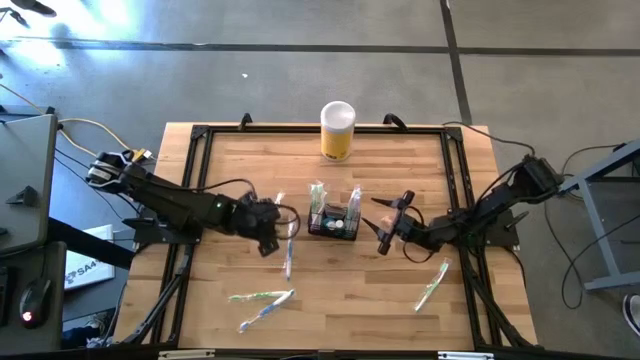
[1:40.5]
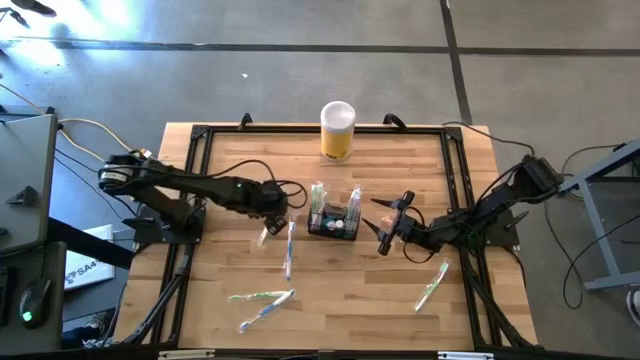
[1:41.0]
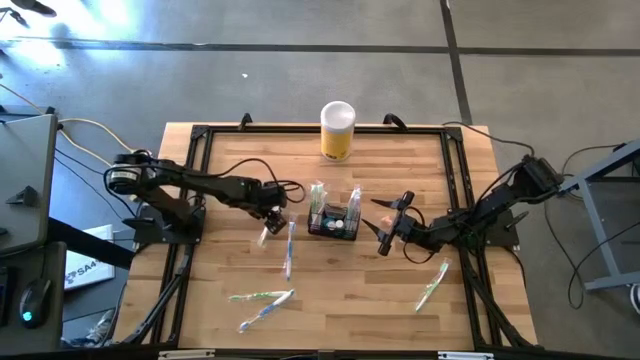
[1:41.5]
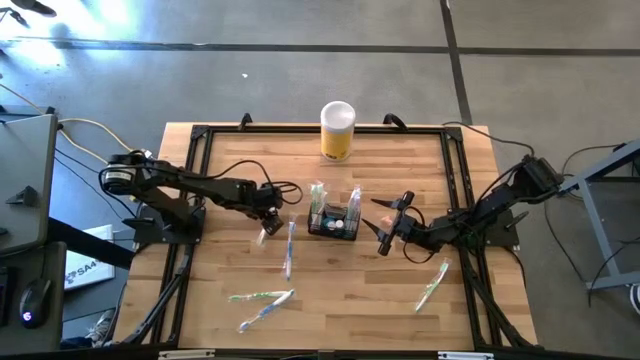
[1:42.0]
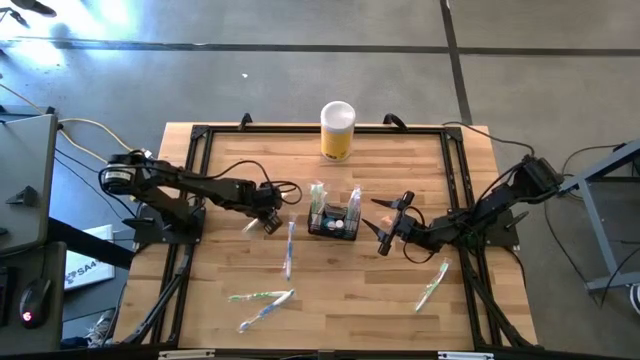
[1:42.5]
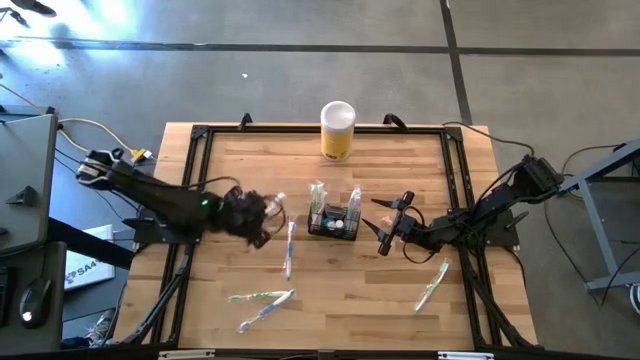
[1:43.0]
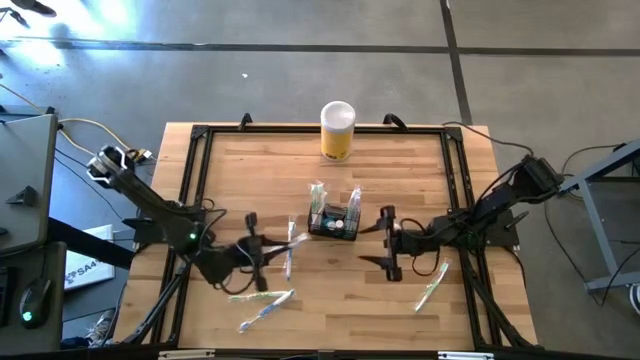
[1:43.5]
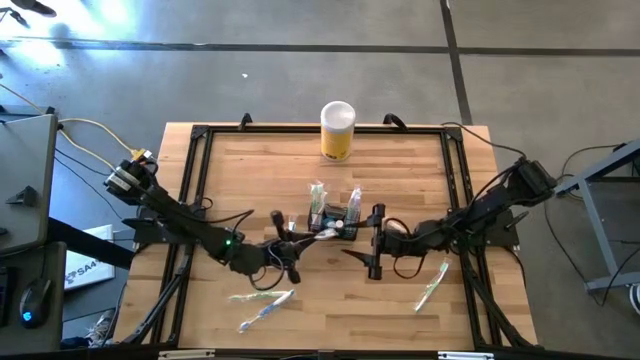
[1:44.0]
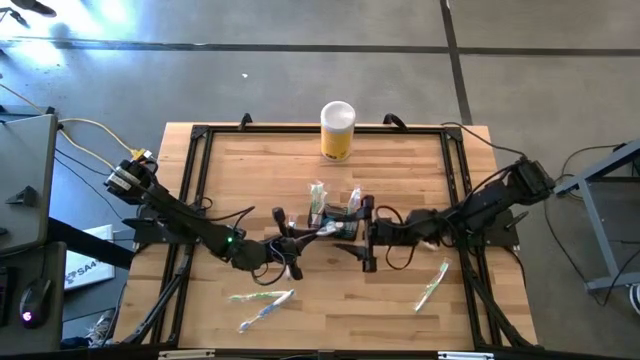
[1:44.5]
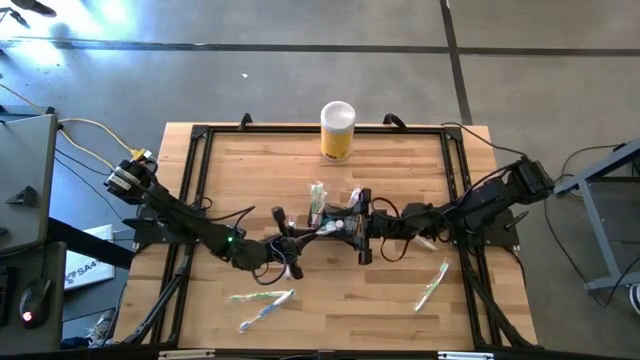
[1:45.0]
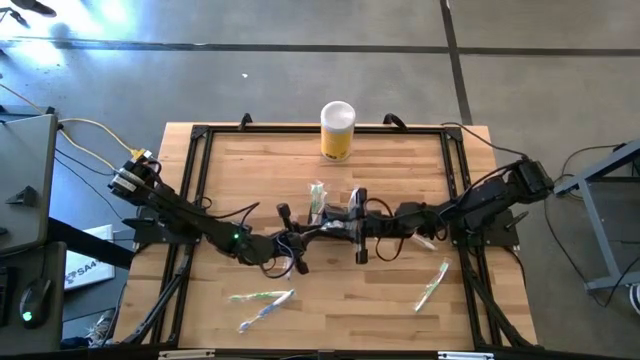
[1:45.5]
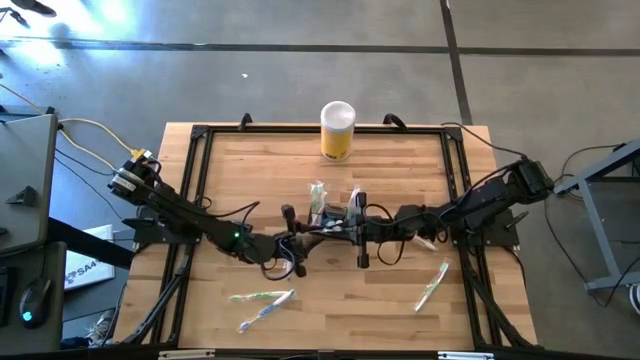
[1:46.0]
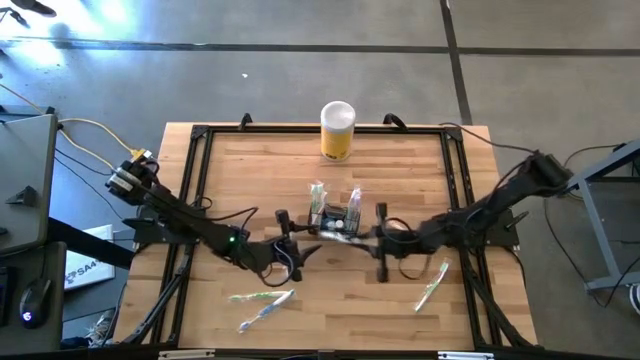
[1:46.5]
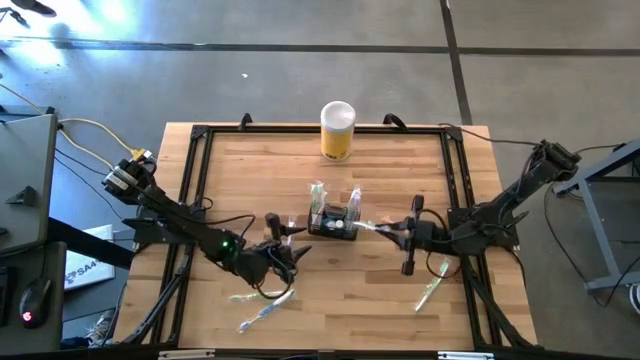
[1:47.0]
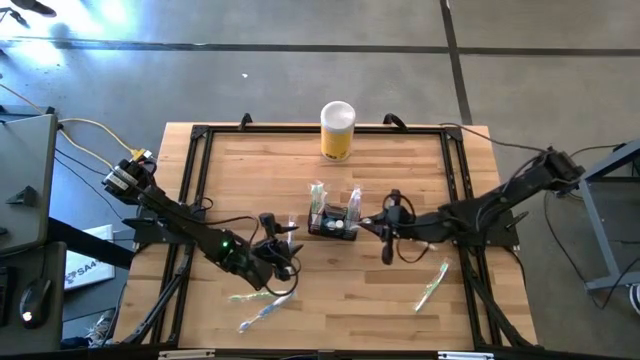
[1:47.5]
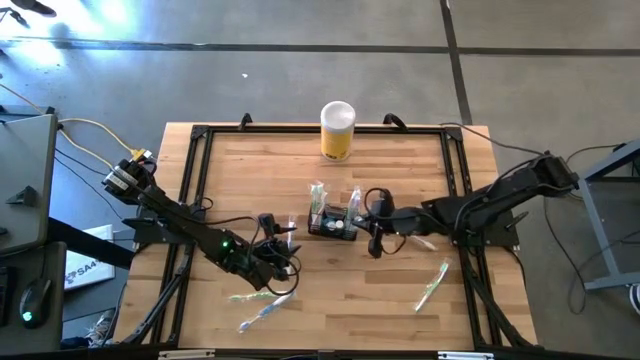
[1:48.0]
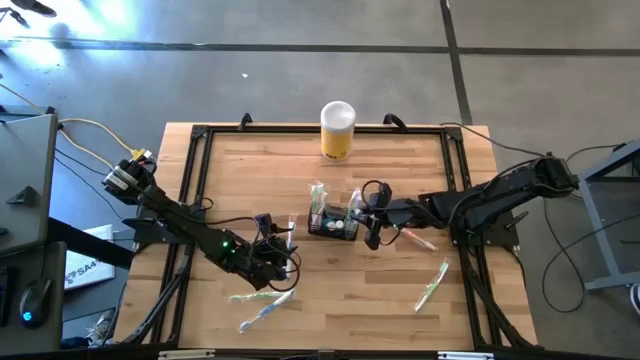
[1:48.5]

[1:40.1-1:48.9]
Task: Pick & Place toothbrushing station
Put the green toothbrush into the wire organizer

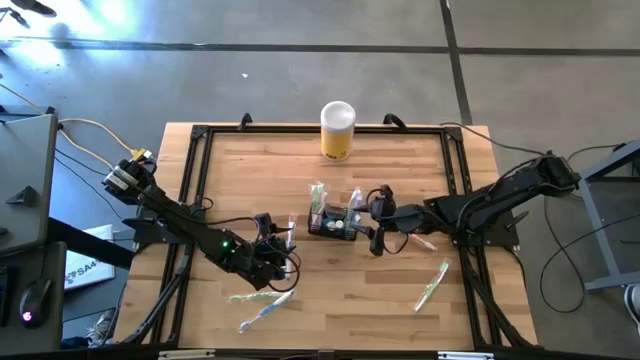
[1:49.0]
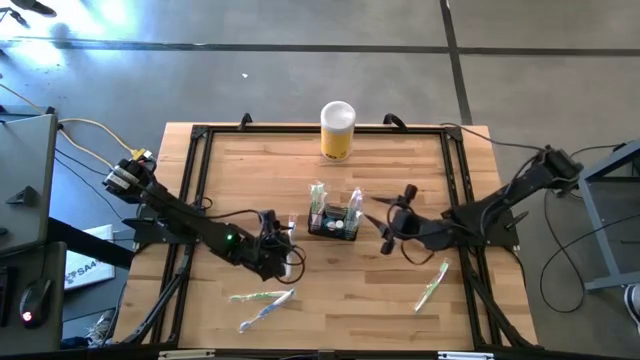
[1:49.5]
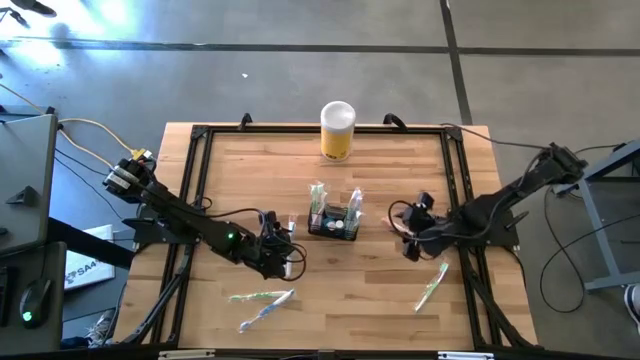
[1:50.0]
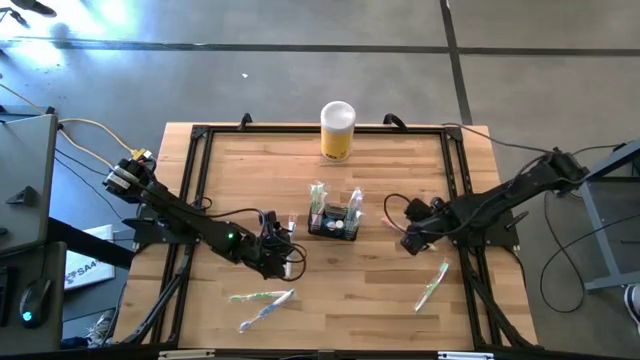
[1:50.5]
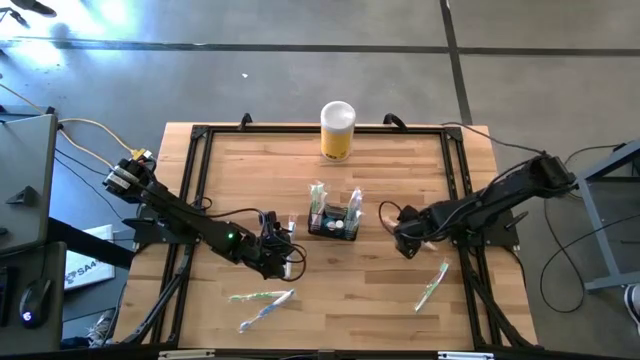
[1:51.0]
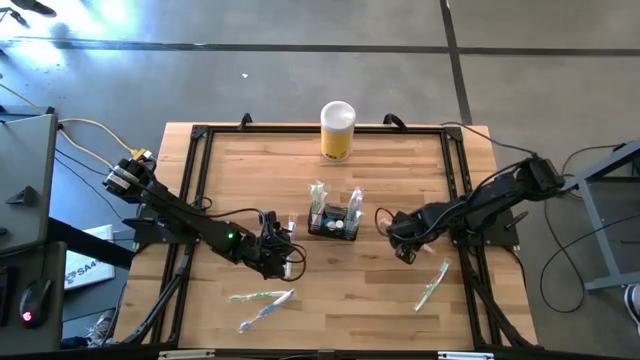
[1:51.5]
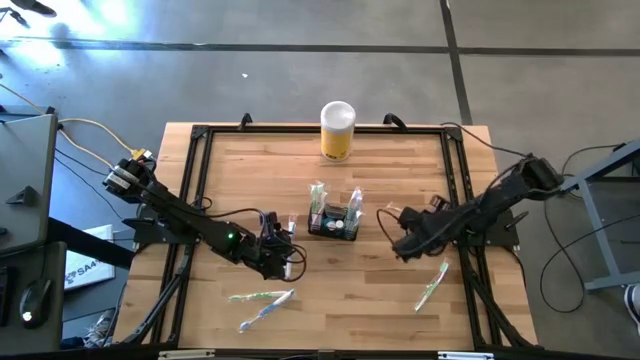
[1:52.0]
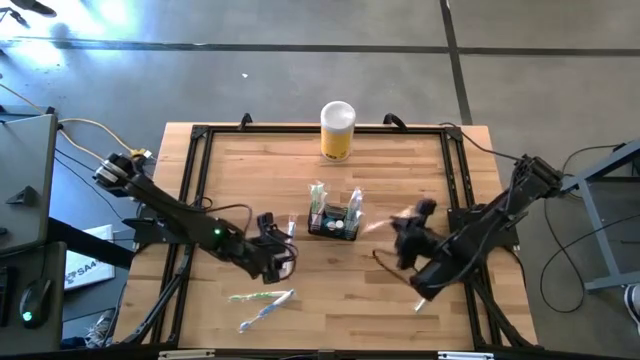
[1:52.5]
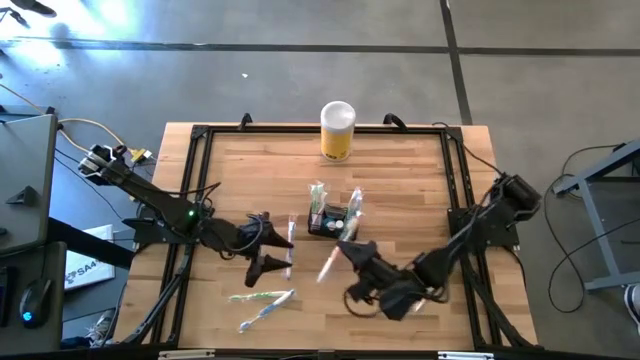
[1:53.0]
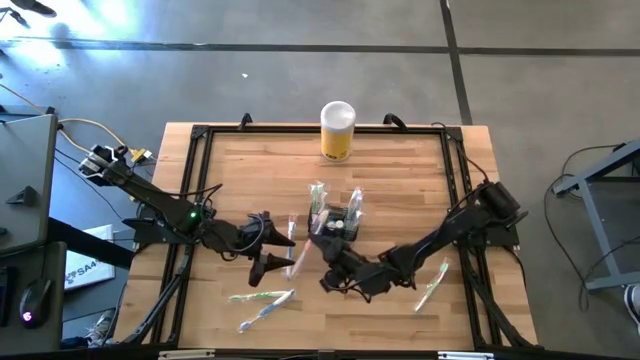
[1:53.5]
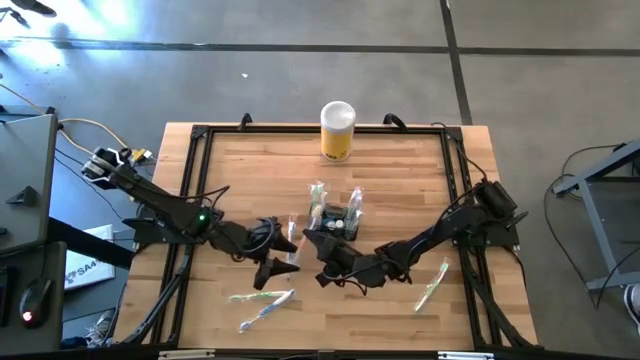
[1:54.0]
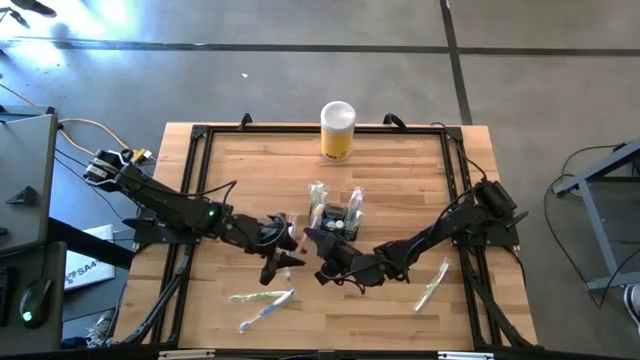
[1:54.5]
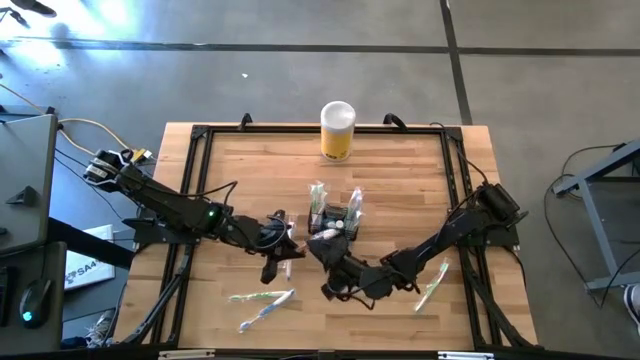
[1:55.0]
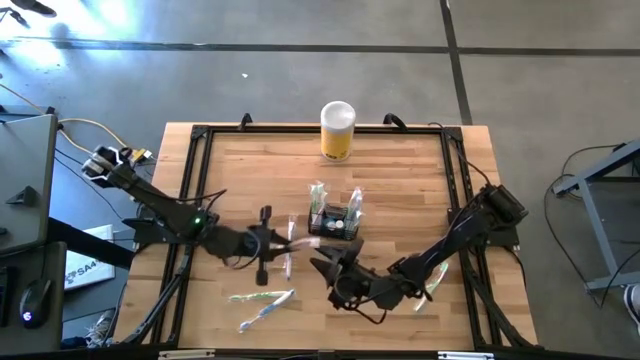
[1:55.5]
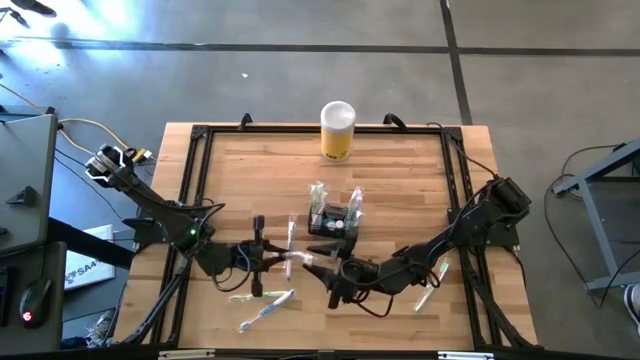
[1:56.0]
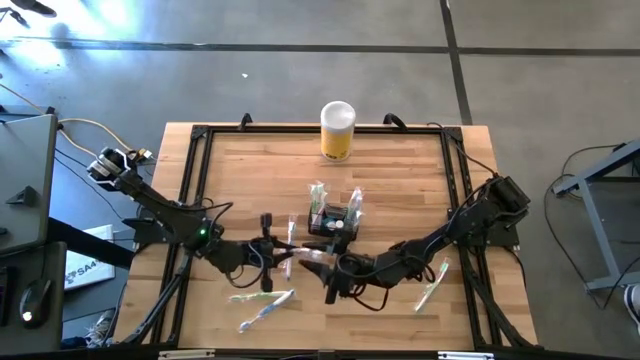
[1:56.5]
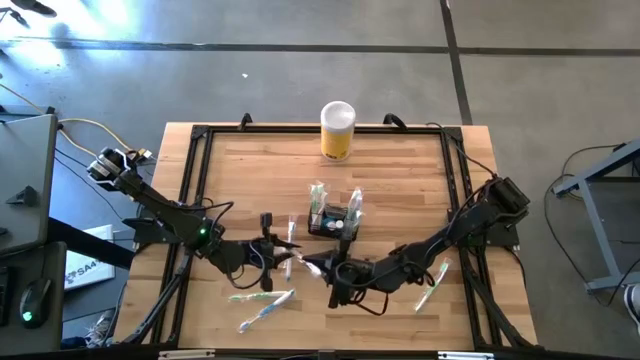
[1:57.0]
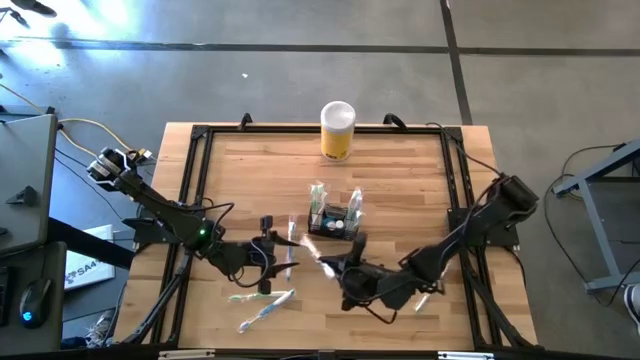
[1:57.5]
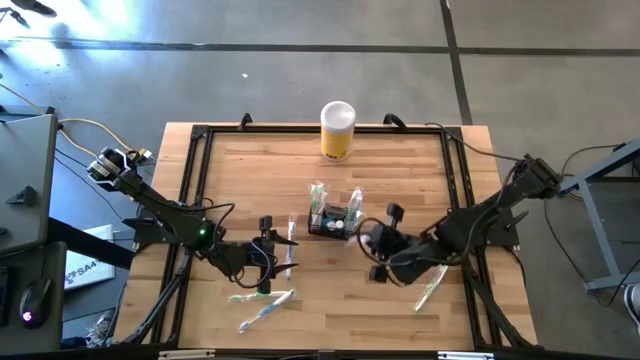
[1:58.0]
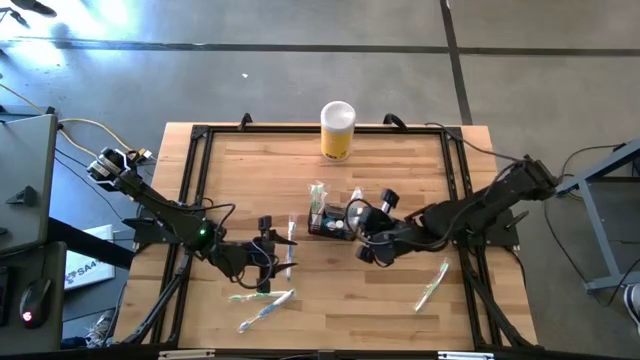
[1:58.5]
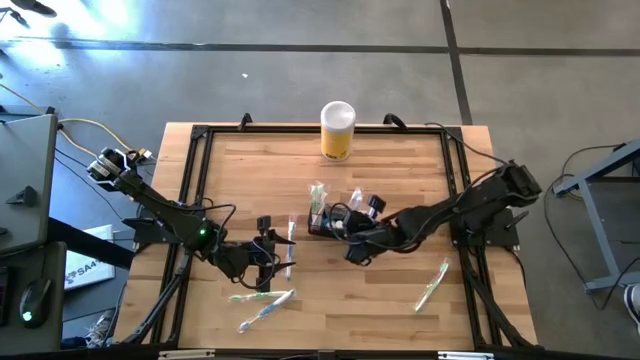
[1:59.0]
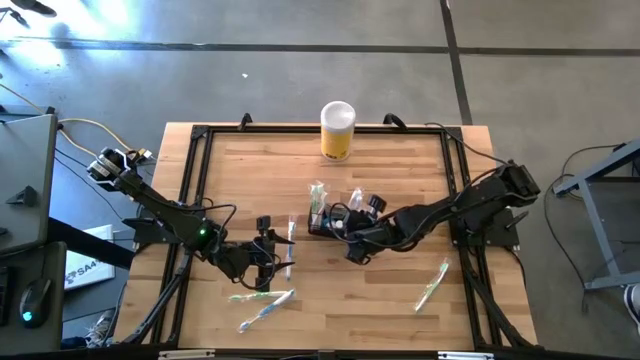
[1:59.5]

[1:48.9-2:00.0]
Put the orange toothbrush into the wire organizer

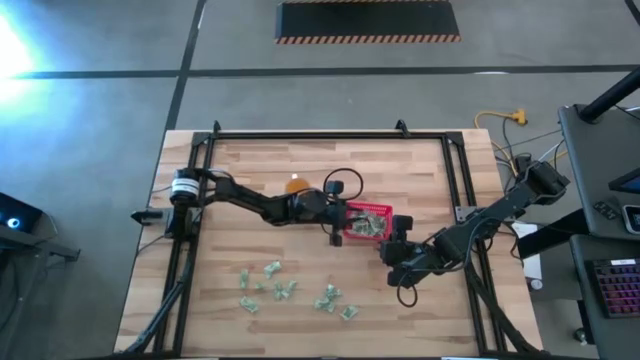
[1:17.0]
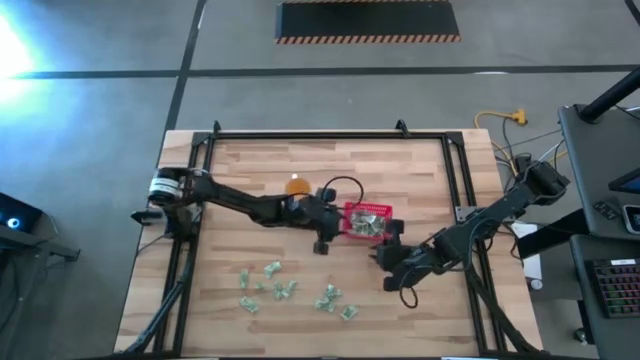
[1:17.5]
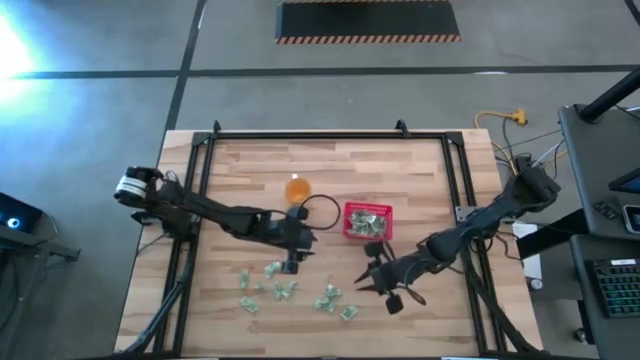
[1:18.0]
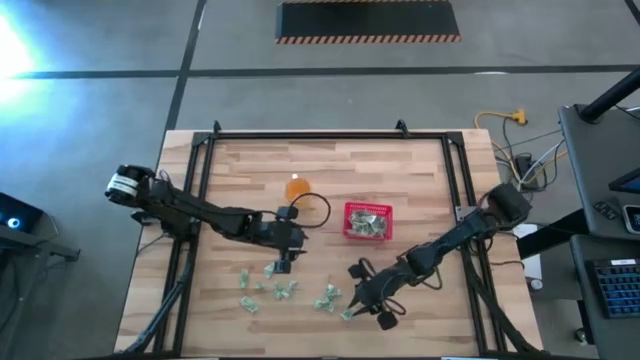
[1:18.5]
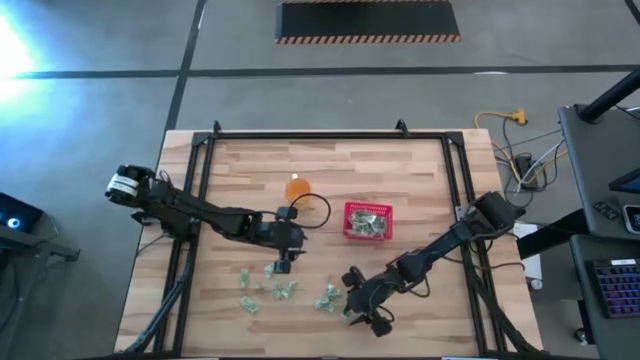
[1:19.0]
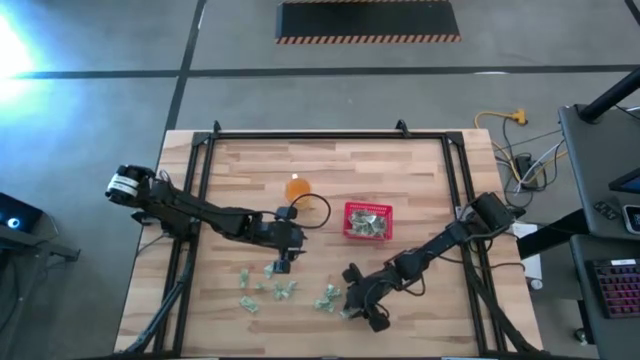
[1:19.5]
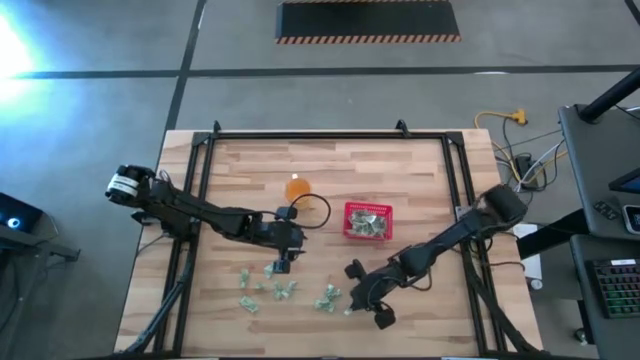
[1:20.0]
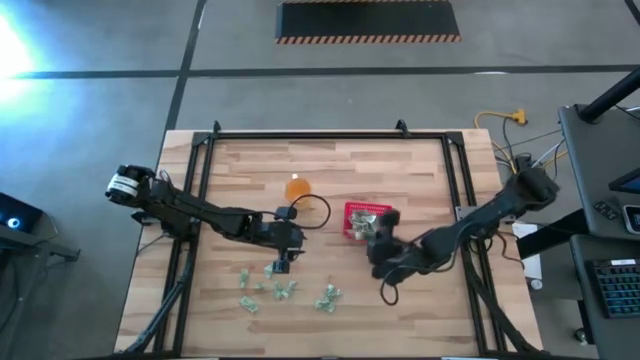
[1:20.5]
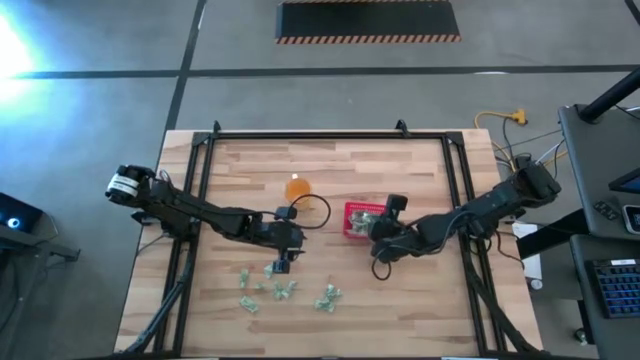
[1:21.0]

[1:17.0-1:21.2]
Task: Pick and place Stevia / Truvia into bins
Put the stevia packet into the basket
